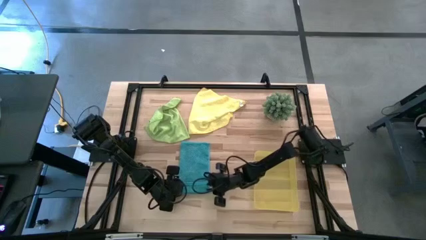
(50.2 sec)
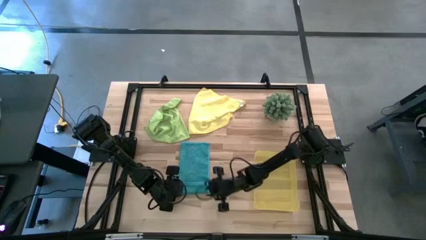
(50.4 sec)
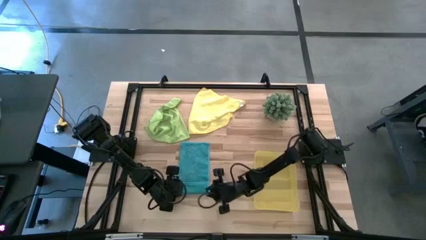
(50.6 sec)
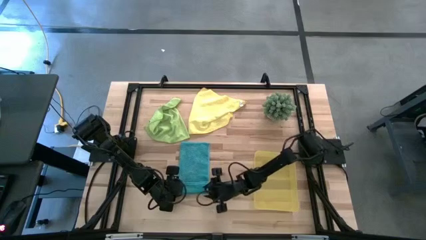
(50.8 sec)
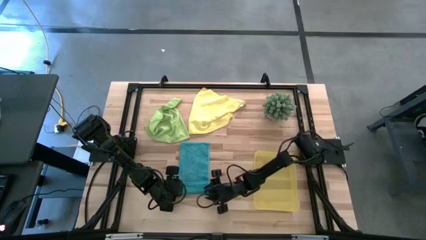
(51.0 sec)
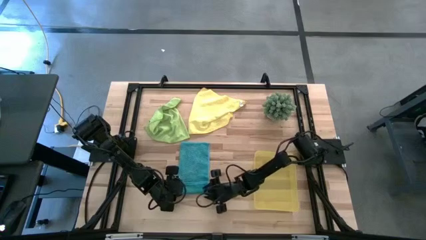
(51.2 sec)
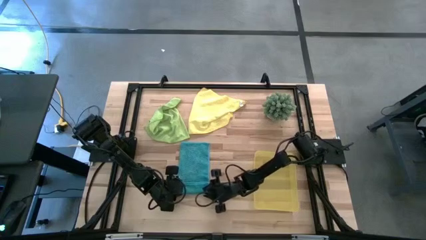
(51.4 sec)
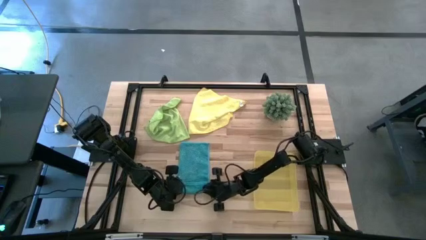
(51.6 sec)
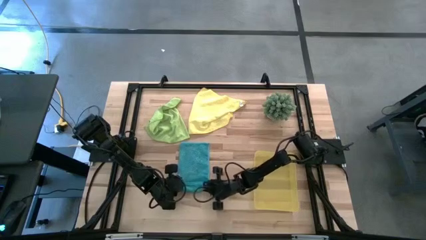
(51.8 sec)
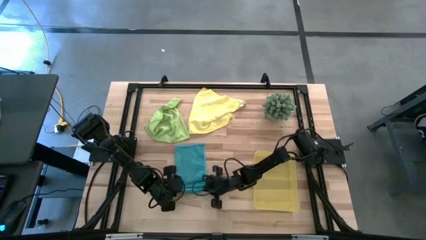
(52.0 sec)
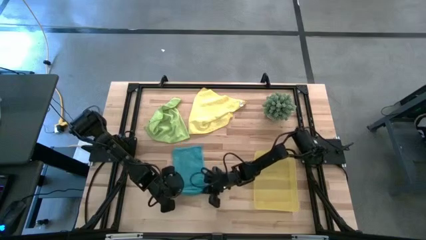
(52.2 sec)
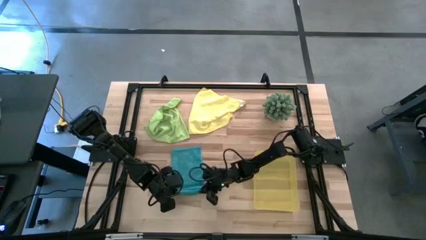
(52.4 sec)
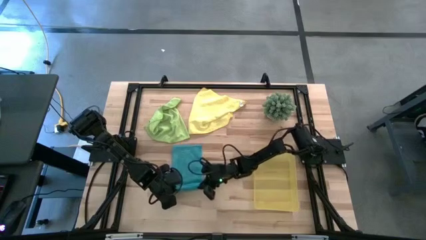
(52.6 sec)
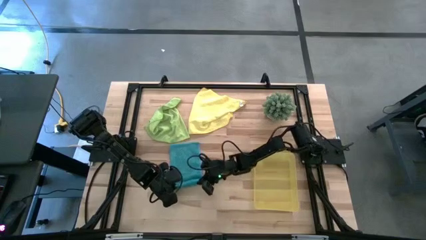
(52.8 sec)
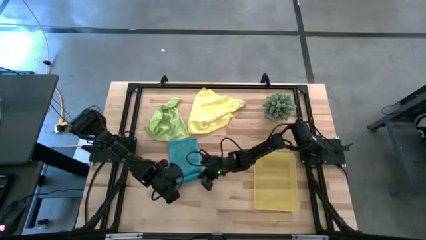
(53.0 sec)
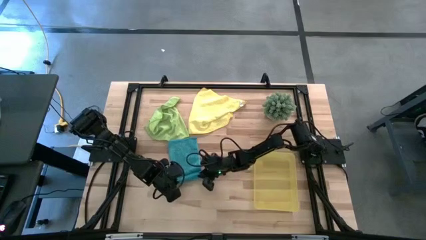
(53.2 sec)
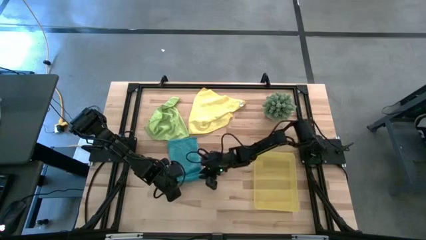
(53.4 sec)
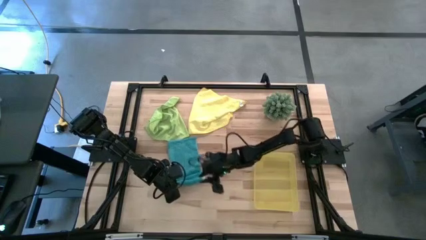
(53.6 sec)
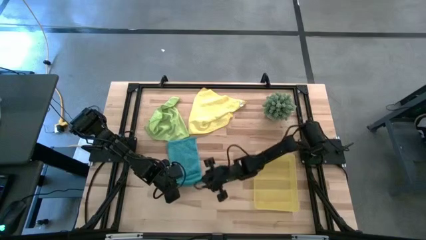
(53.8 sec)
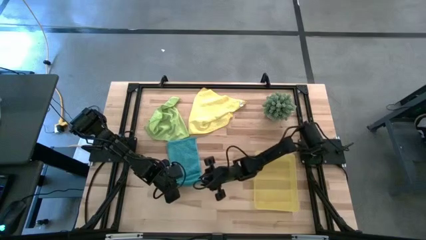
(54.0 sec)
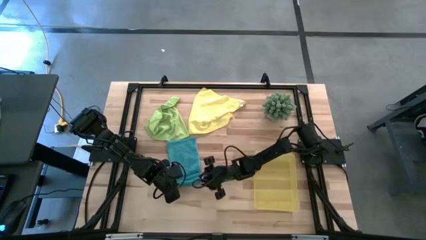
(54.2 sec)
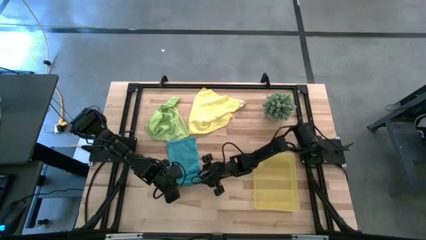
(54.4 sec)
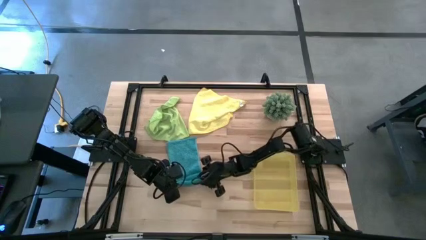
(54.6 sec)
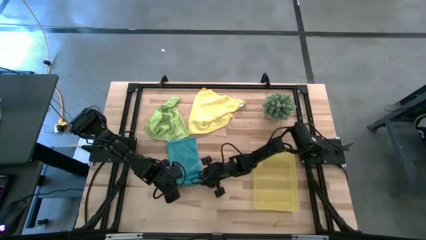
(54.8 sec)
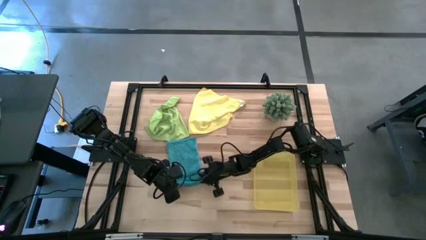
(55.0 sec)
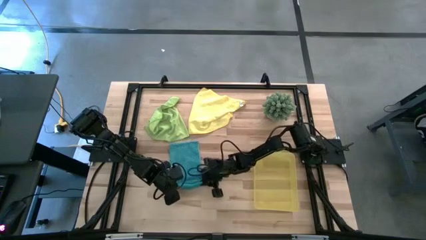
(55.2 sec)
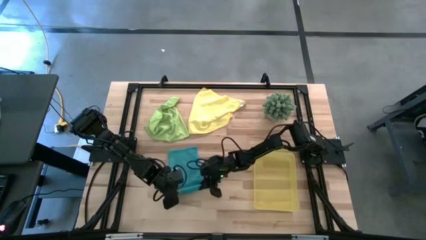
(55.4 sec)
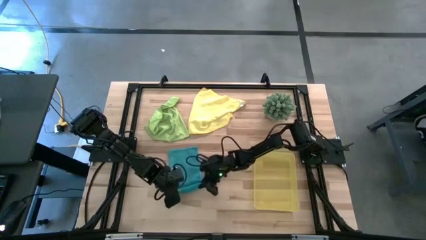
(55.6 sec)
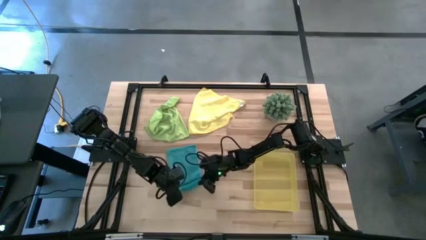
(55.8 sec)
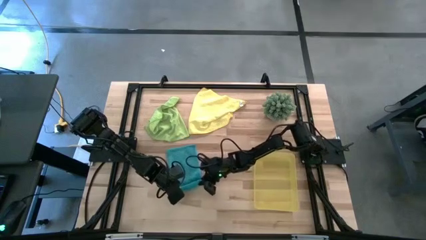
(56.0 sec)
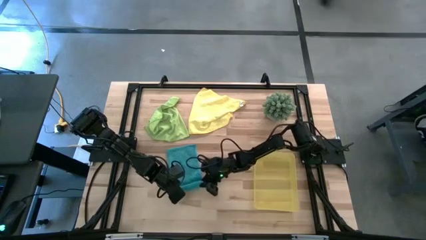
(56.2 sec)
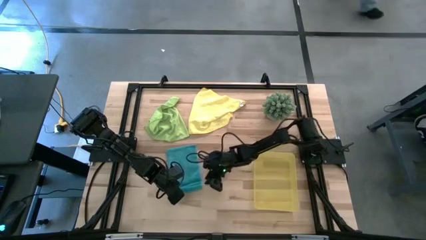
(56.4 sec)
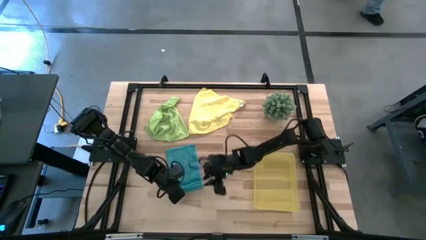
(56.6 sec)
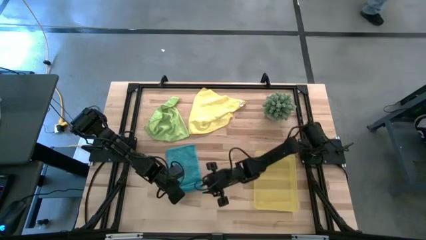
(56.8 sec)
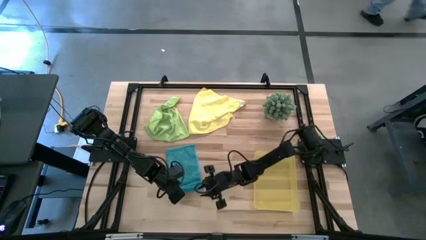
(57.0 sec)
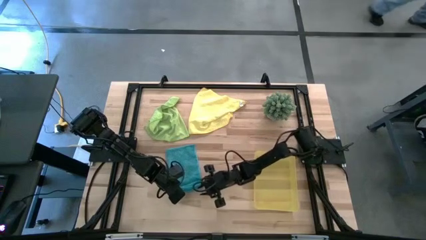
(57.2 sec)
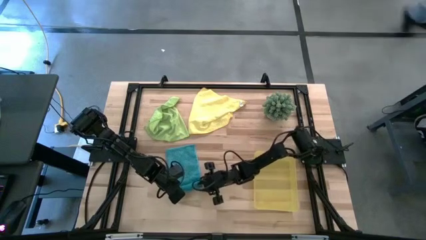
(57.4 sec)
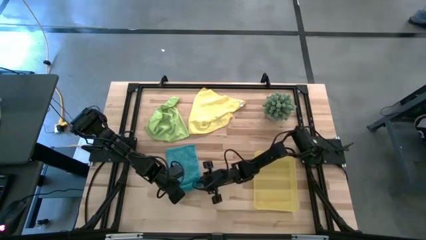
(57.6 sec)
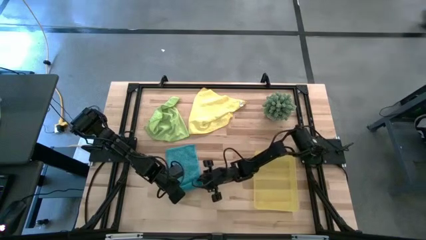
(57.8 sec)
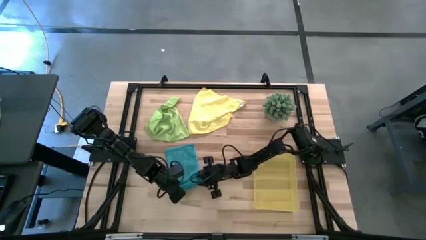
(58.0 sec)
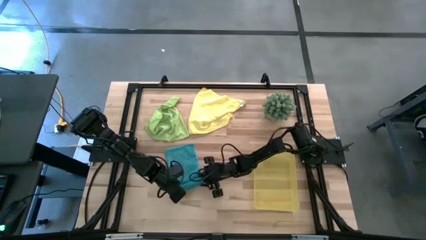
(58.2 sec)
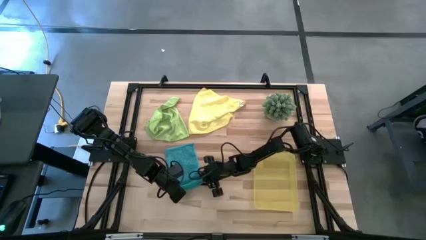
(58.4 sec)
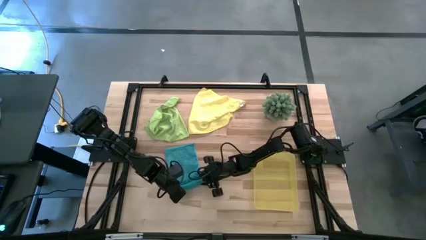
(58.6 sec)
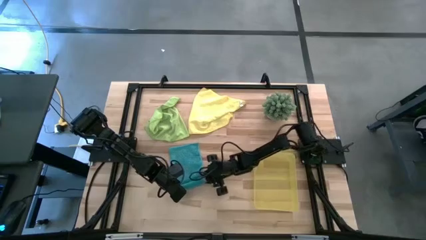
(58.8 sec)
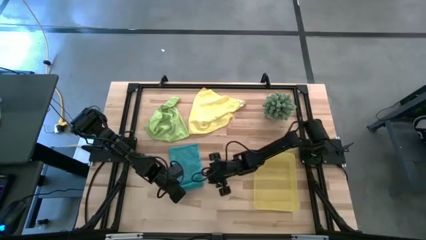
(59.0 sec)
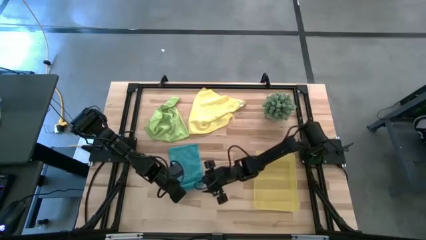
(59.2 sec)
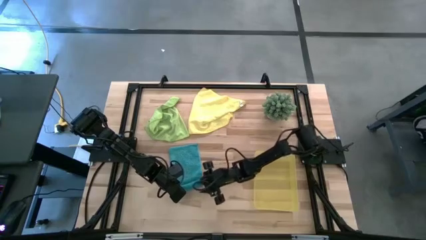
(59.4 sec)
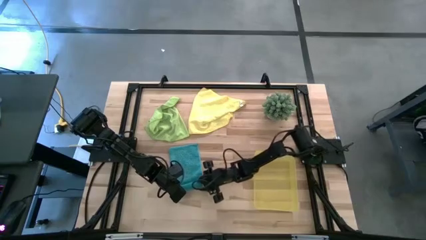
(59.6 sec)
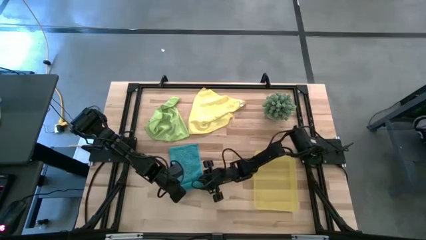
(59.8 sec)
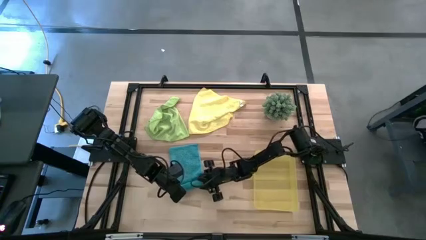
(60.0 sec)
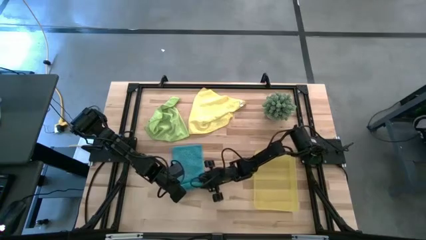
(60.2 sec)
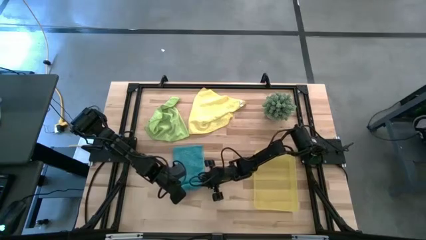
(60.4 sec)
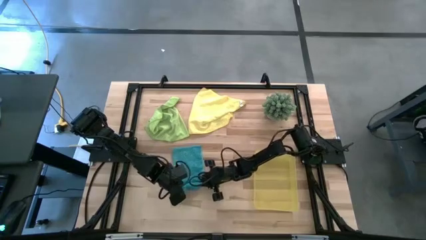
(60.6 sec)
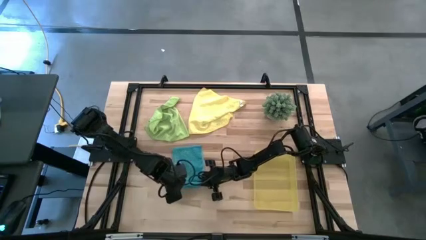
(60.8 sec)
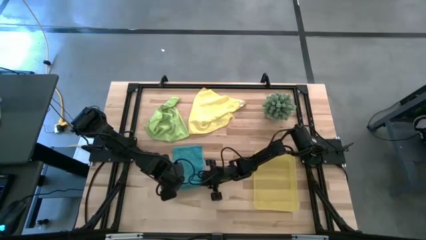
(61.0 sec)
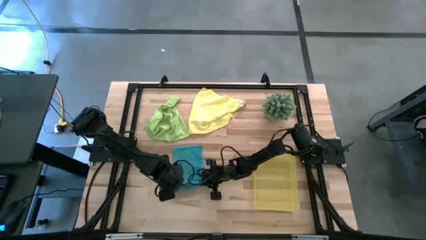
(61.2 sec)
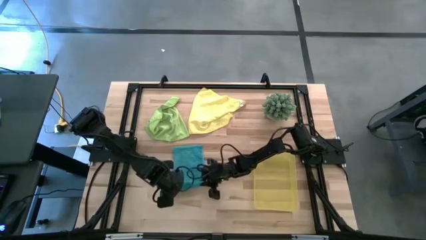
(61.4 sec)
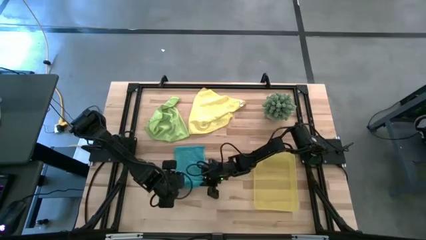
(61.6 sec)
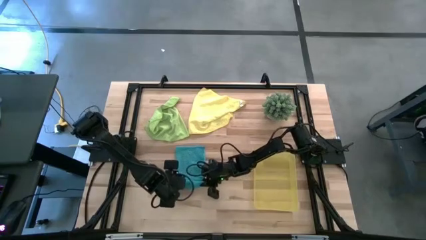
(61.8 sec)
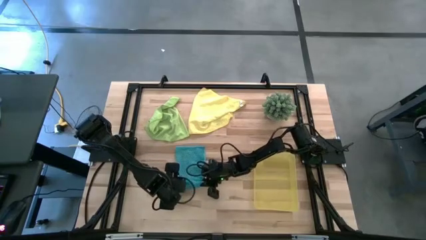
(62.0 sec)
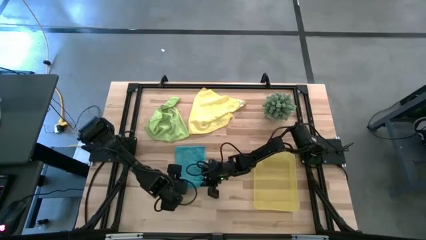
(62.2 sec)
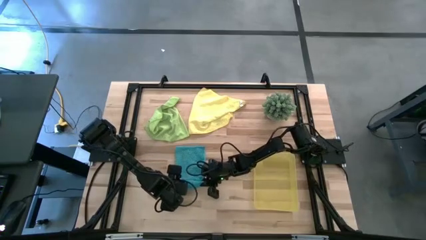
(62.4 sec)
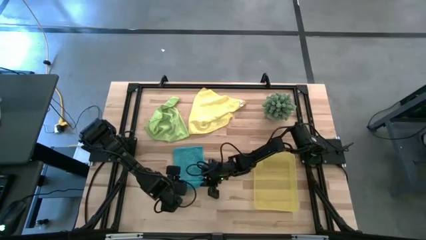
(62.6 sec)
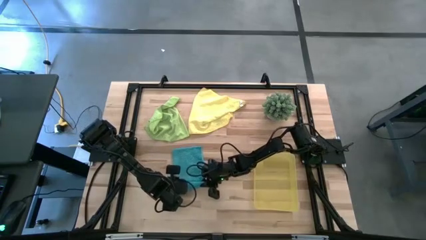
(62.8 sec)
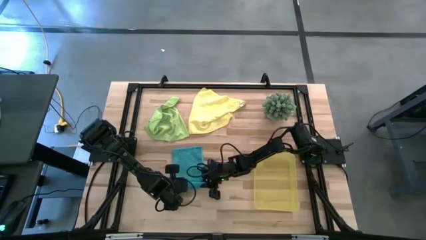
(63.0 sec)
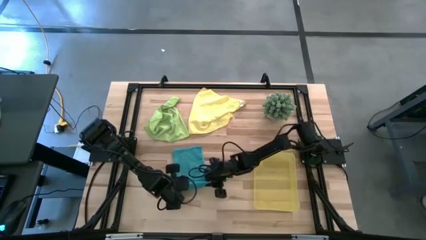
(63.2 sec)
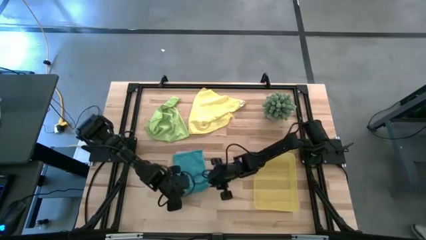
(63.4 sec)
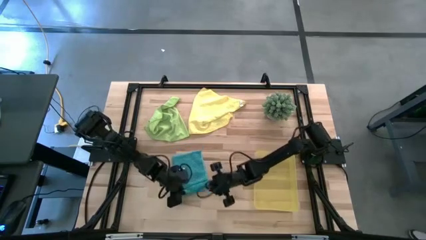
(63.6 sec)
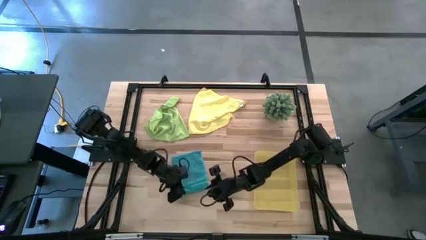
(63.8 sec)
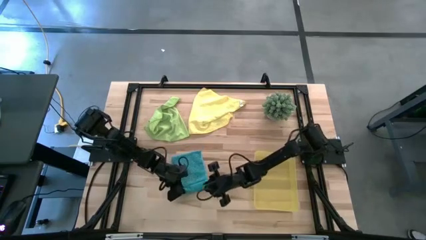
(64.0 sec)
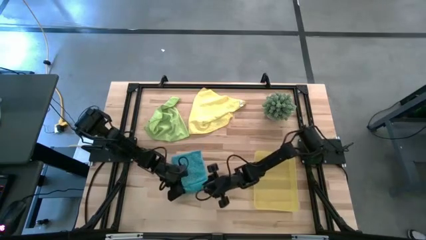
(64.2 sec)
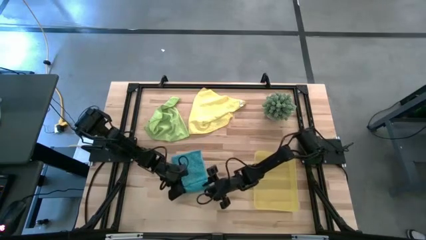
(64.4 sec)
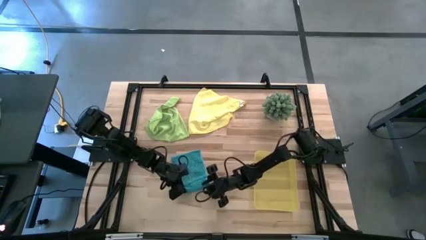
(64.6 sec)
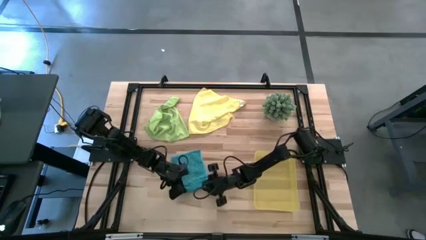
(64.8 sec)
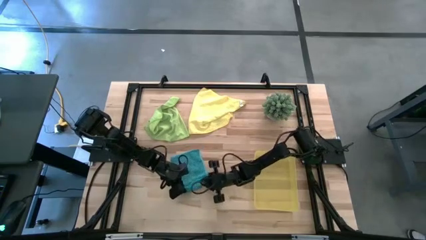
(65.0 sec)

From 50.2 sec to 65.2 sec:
Task: Roll microfiber towels into tight, uniform cylinder then place into a basket
Roll the blue microfiber cloth
